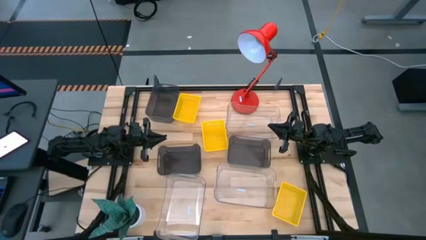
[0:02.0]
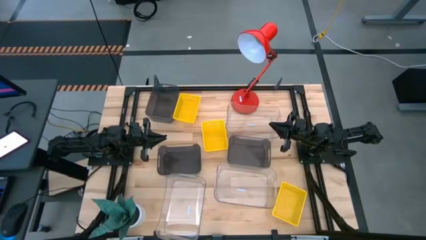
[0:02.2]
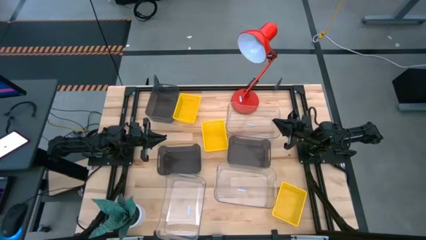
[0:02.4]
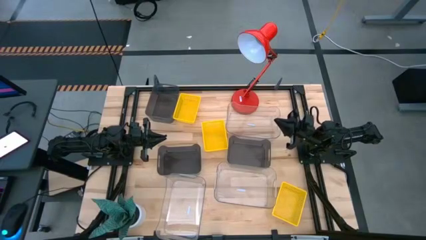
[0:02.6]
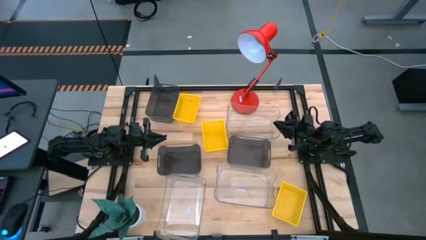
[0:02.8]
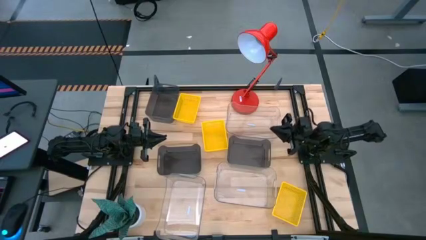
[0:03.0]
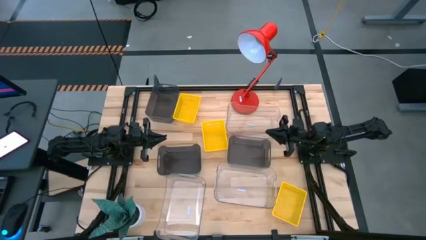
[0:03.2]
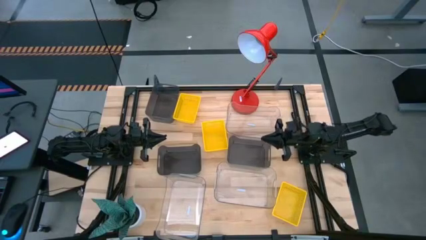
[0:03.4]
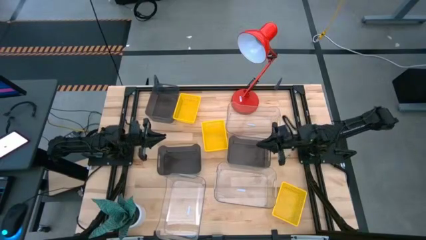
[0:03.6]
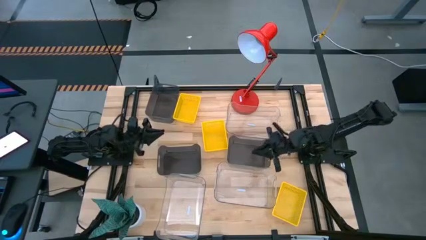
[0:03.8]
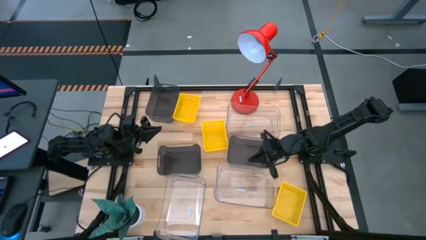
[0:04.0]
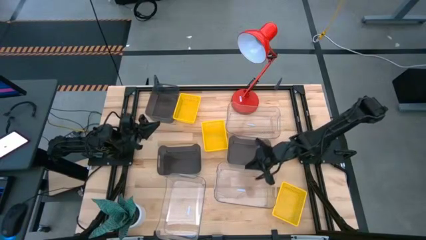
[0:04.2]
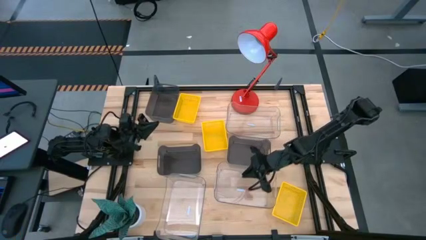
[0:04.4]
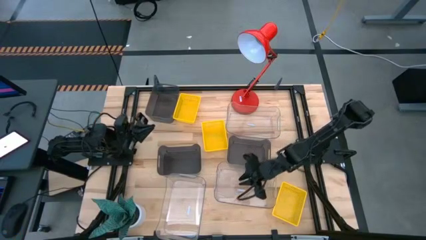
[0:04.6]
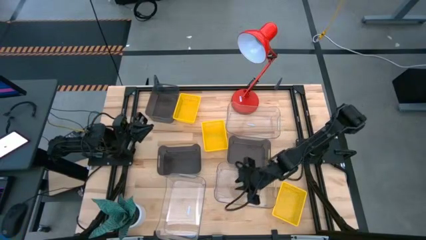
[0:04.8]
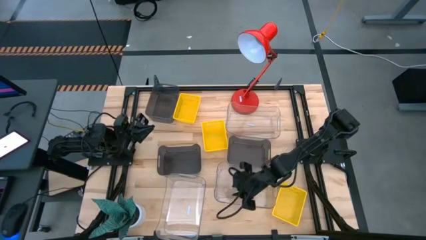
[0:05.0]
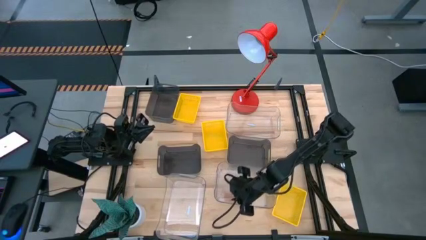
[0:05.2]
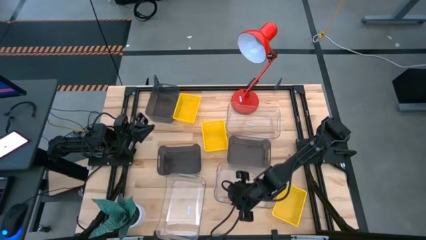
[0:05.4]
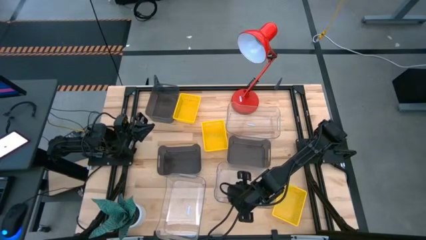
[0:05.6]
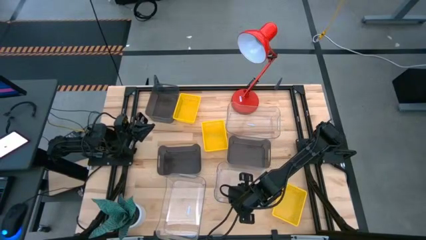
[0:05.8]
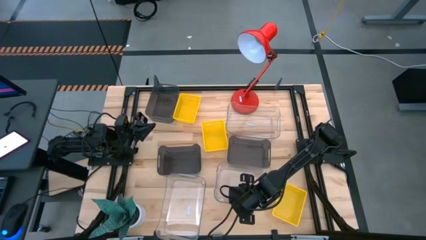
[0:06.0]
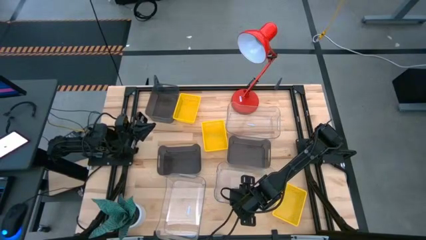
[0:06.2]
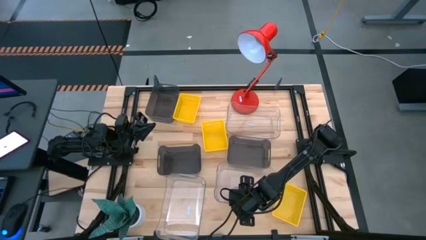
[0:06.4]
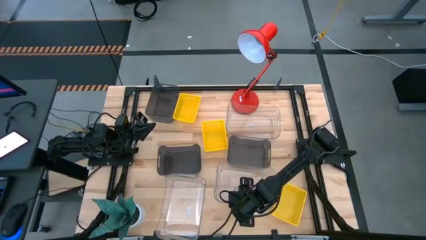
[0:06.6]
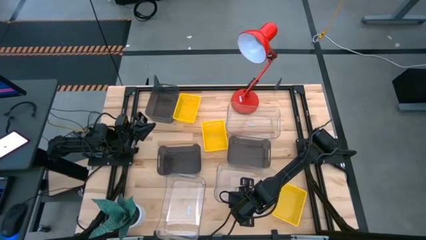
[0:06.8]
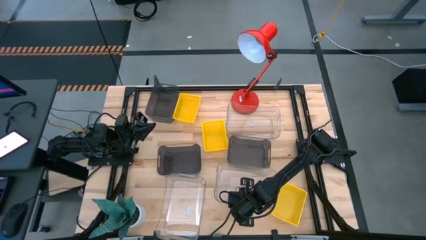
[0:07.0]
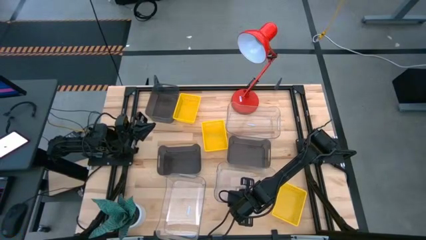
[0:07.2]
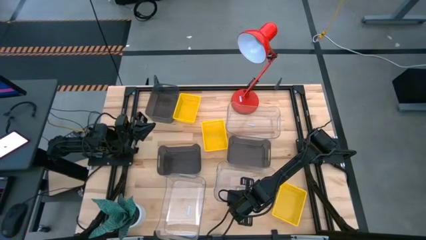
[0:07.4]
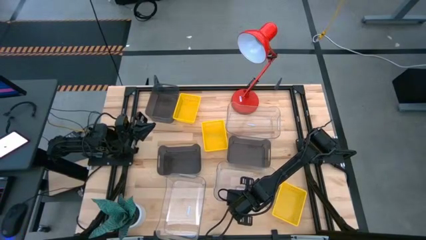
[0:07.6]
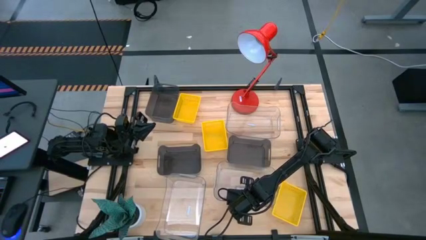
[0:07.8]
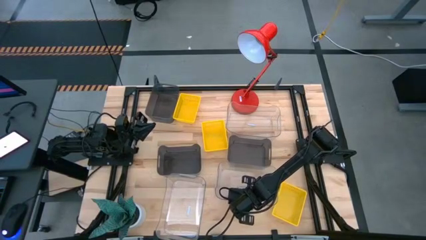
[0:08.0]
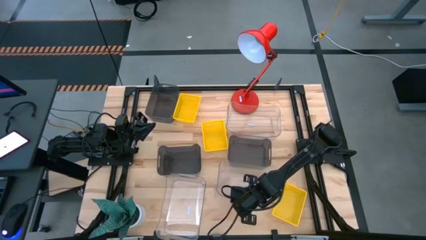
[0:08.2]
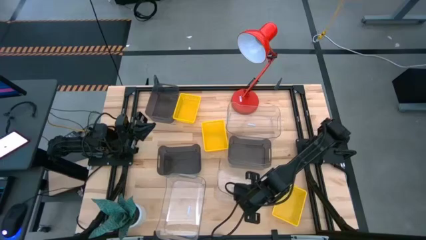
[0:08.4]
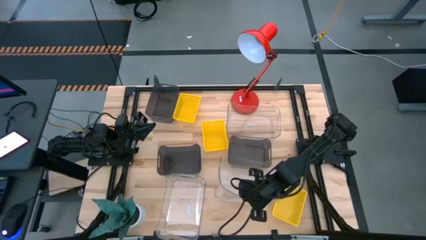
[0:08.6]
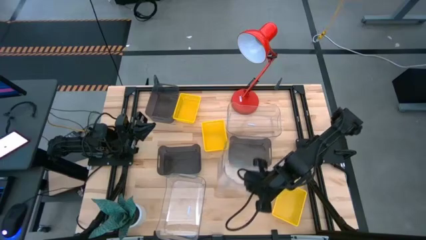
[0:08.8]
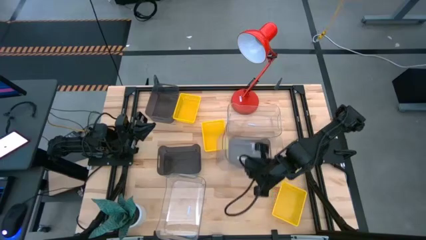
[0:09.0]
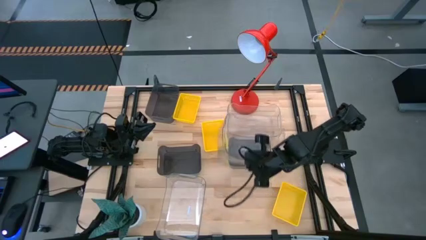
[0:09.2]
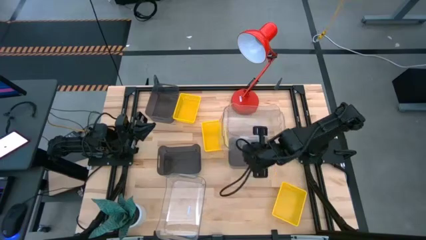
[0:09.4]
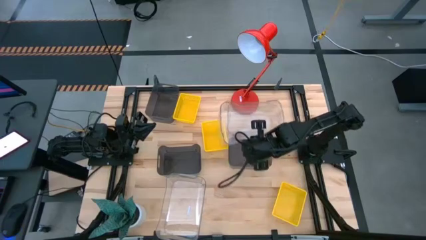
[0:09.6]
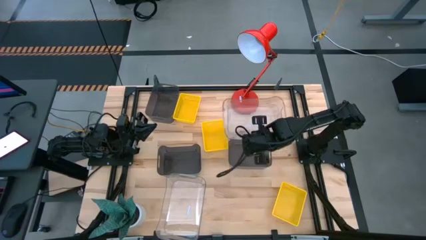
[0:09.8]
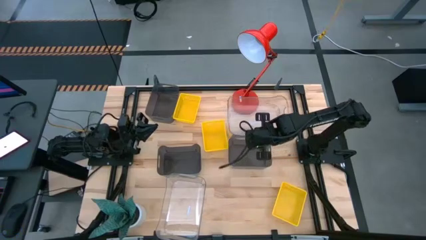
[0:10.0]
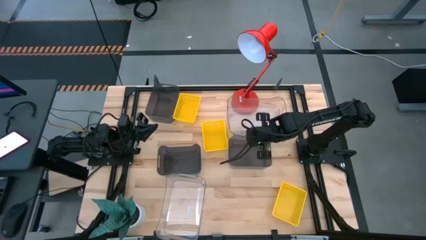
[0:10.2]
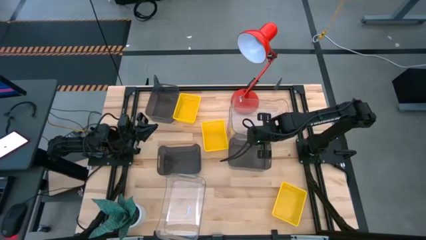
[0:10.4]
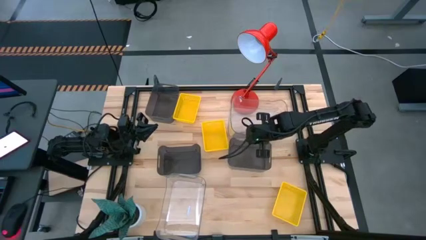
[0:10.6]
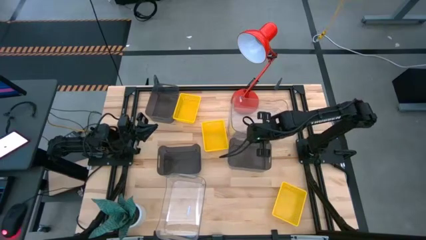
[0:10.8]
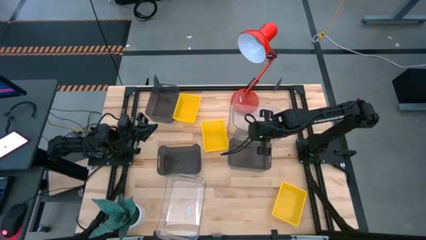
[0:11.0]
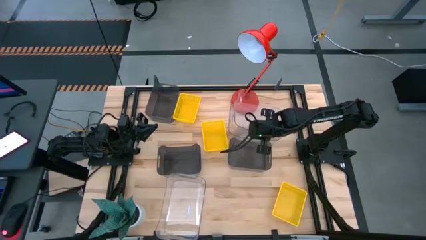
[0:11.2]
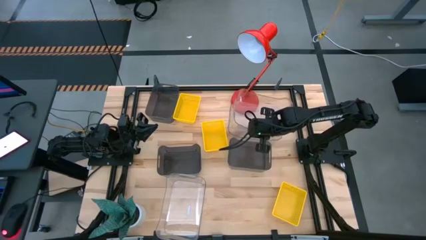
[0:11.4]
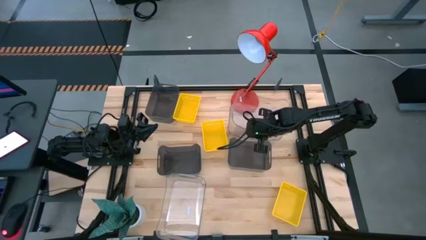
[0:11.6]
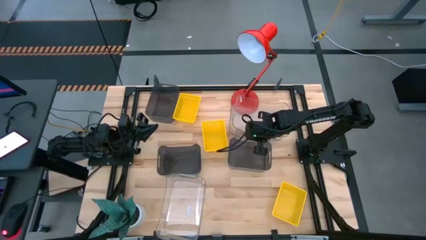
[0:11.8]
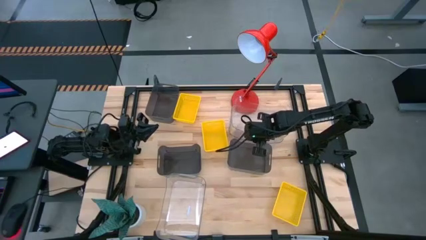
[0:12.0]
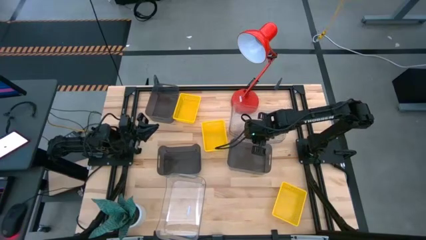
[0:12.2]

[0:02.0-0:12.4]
Stack the bottom right transparent bin on top of the top transparent bin
